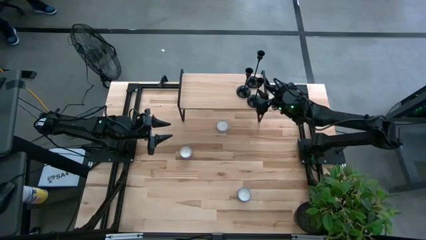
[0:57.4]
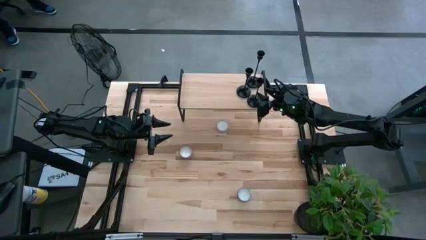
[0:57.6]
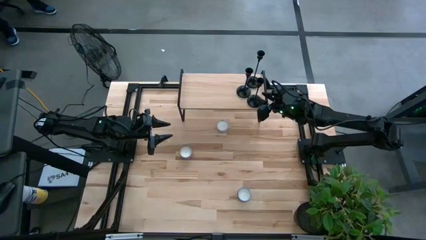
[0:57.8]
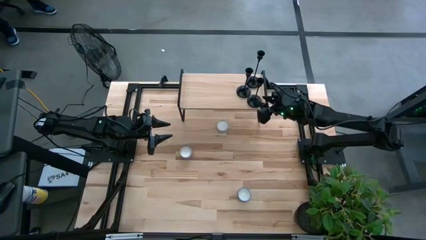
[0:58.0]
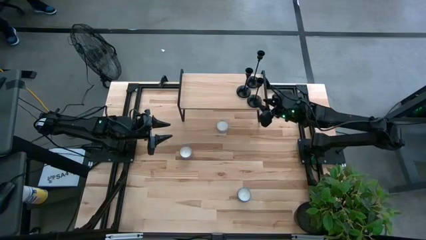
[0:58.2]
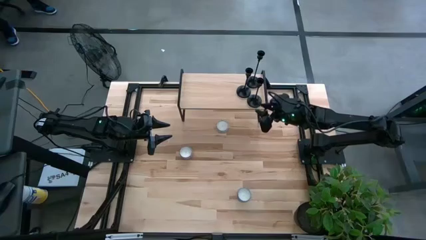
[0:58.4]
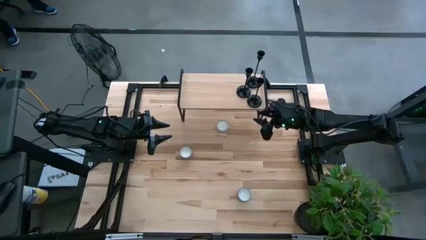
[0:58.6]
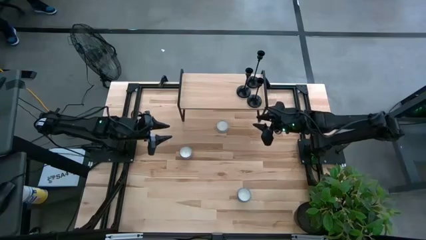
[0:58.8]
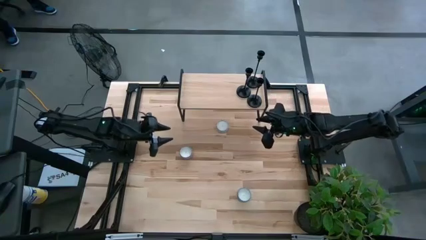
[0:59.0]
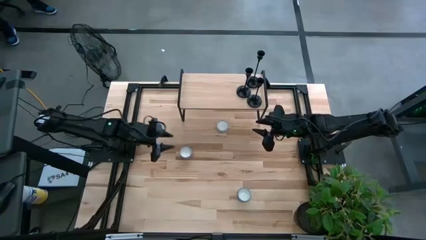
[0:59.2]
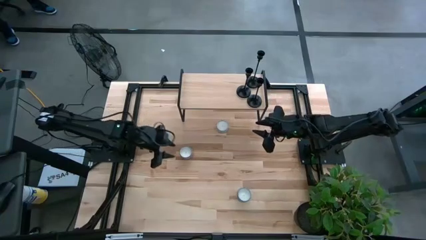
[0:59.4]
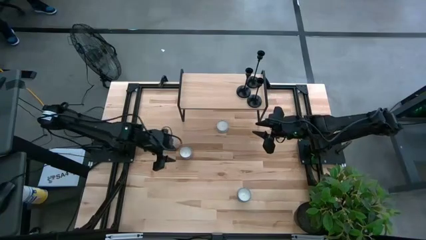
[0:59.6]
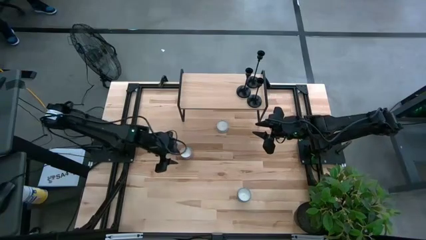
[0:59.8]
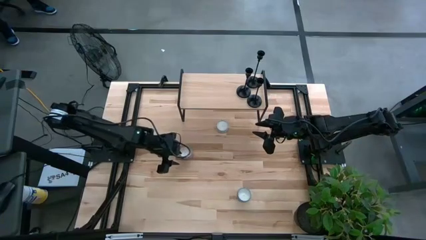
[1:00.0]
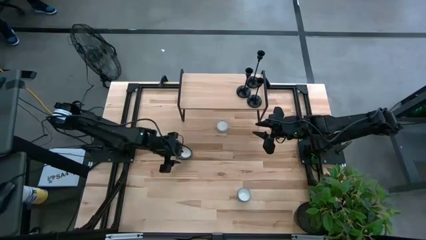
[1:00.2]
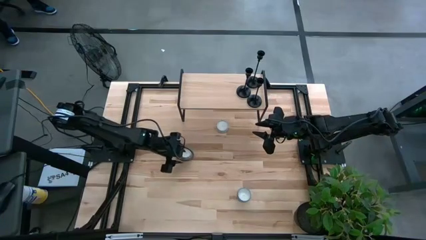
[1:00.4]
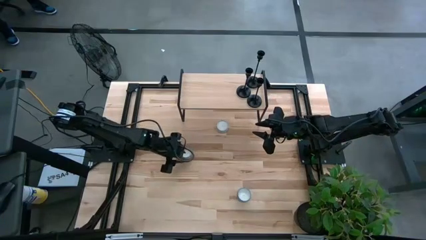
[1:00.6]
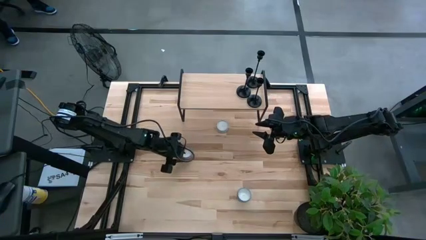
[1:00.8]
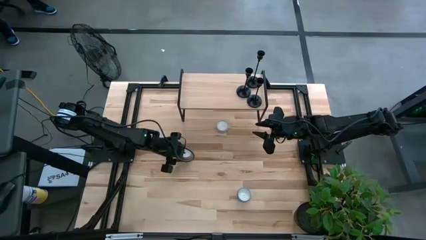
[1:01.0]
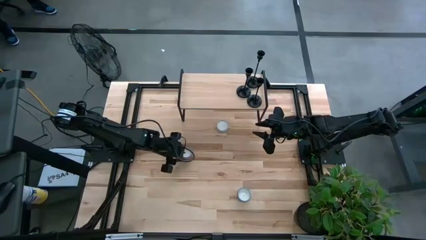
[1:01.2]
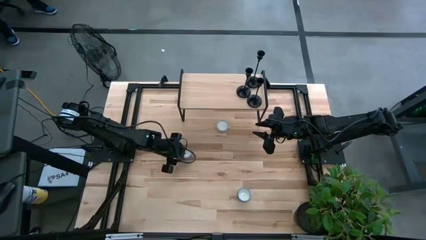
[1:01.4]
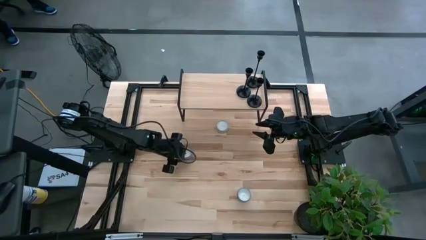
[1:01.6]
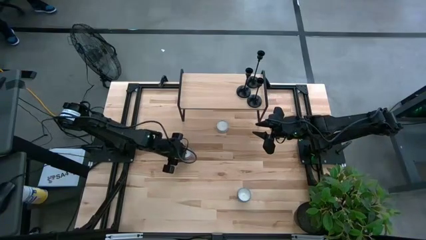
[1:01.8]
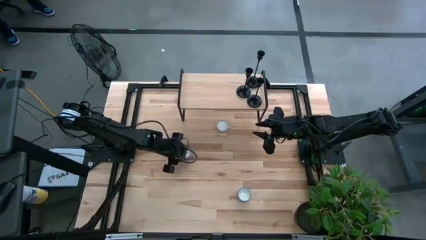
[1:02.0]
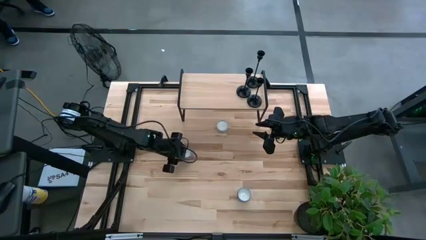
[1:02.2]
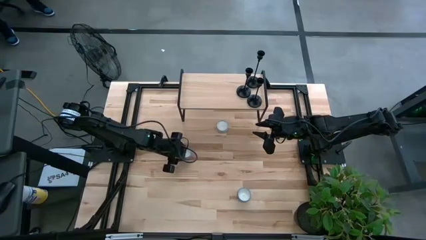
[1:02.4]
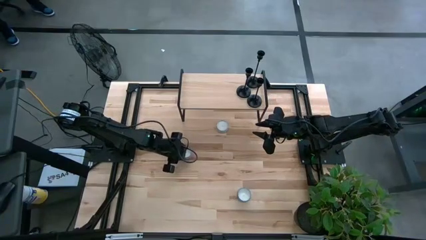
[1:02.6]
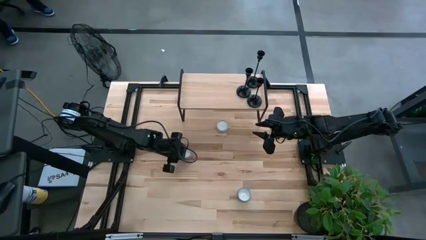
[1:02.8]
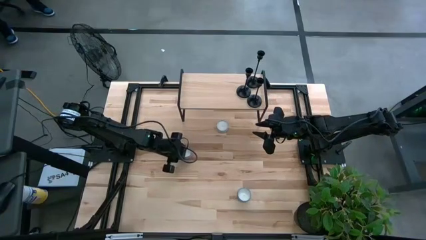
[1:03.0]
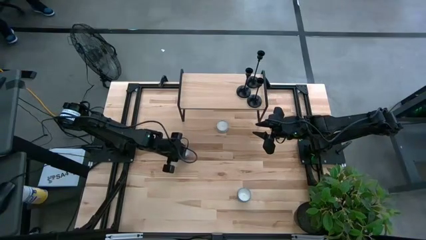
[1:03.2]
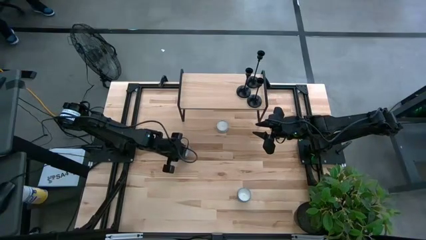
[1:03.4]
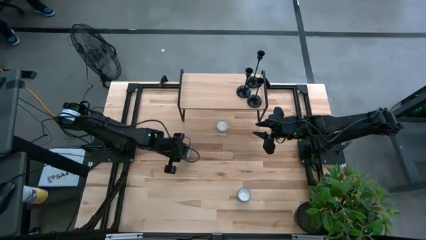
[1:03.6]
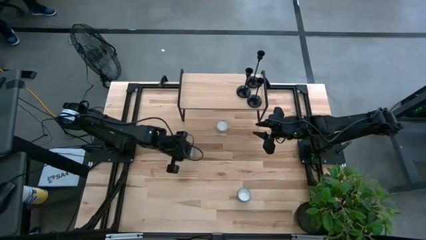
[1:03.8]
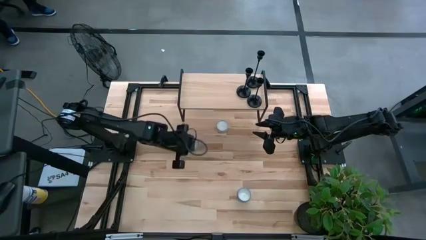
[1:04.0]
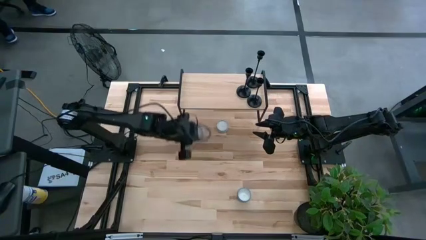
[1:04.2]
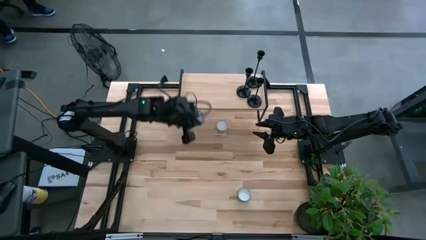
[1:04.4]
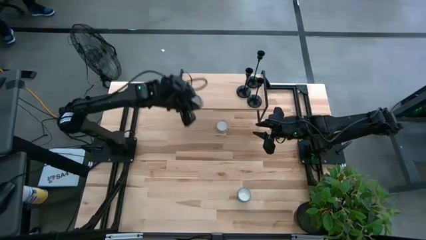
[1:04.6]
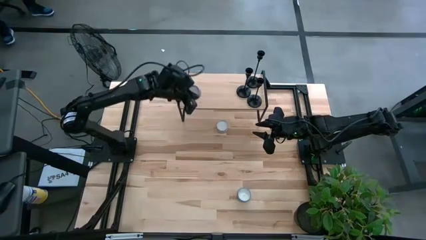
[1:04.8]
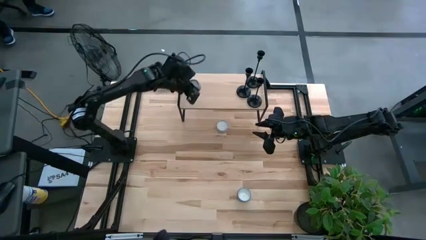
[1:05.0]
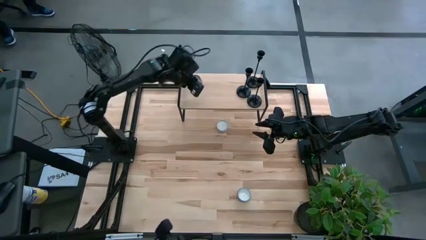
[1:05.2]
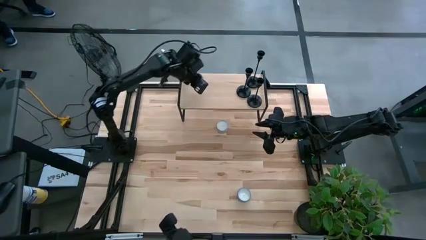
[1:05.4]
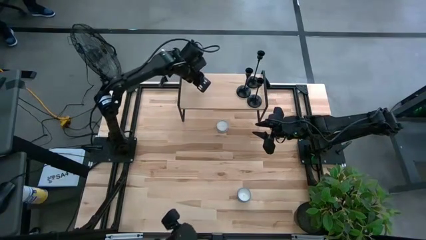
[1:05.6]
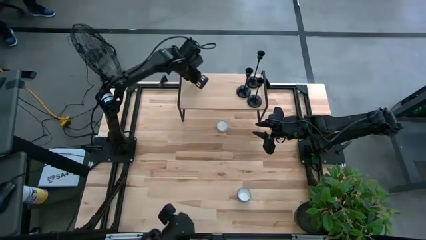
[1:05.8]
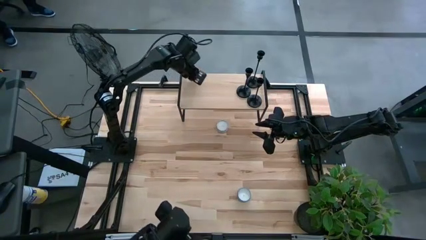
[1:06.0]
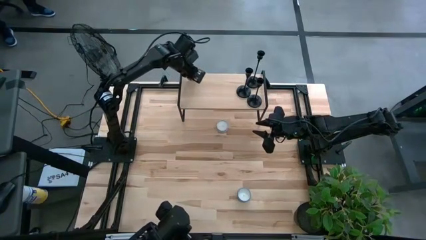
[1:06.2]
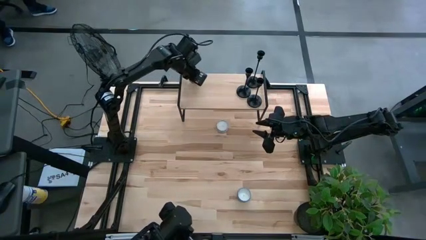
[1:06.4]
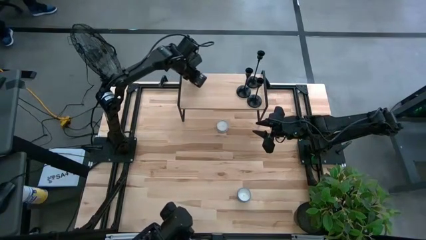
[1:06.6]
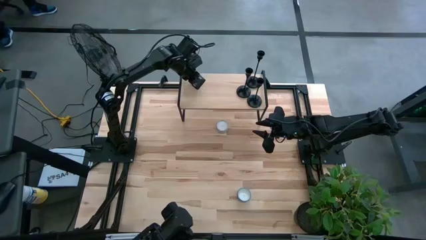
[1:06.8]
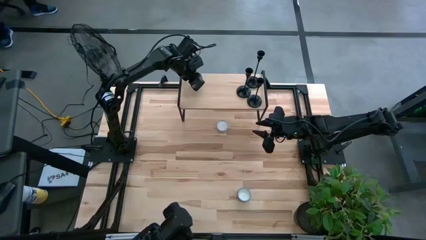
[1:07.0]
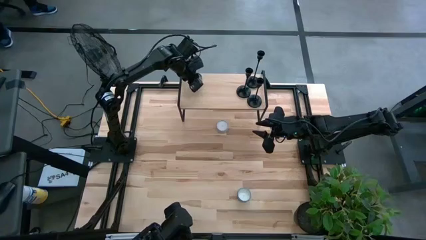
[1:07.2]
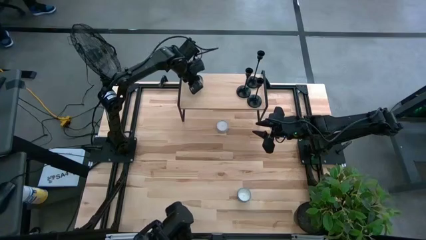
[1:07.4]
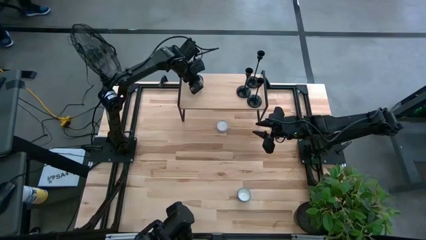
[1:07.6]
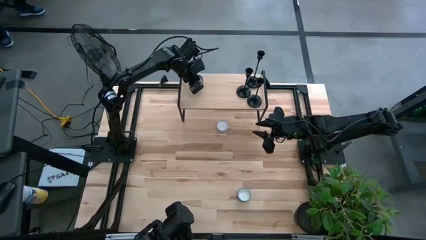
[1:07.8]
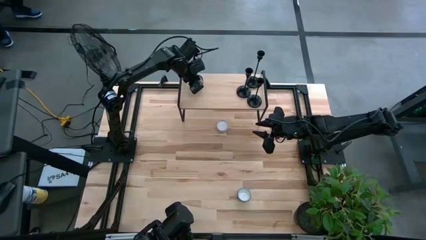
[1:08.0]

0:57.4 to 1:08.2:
Task: Pick & Place candle stick holders
Put the pink scented candle on the shelf

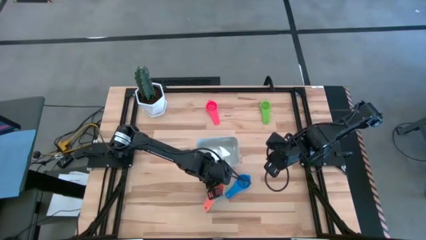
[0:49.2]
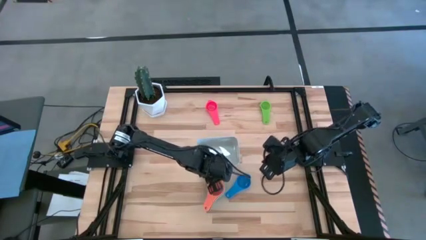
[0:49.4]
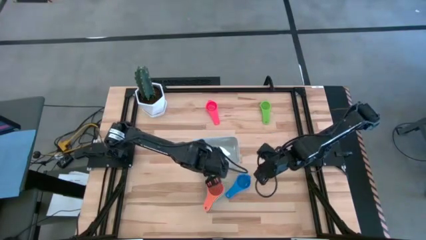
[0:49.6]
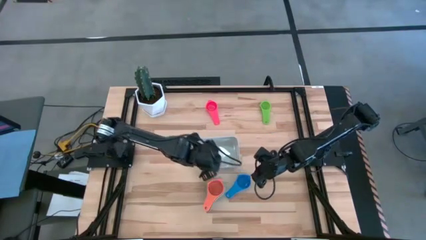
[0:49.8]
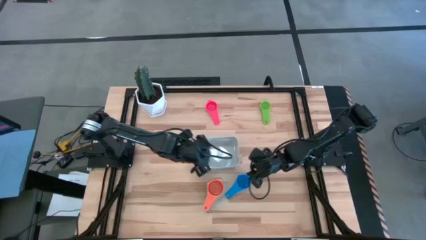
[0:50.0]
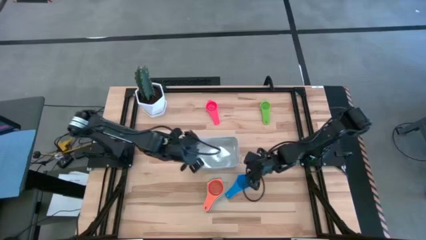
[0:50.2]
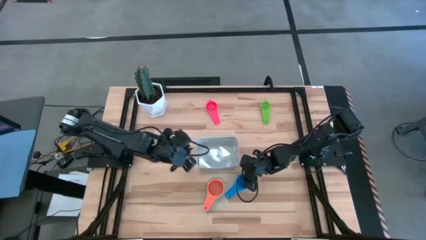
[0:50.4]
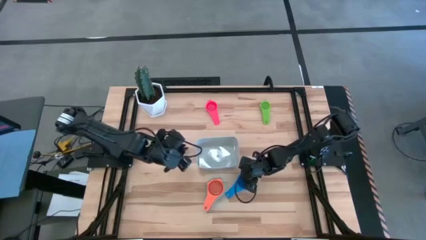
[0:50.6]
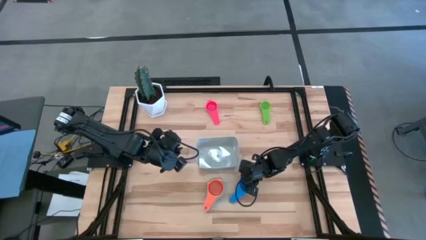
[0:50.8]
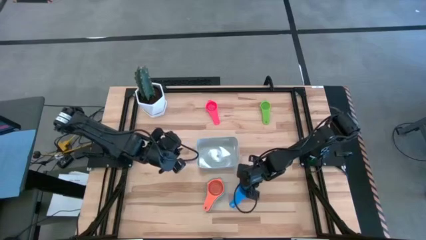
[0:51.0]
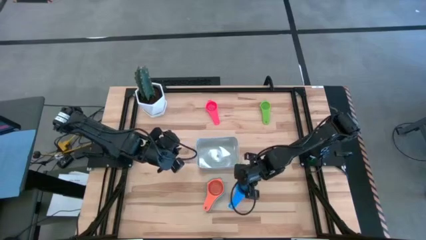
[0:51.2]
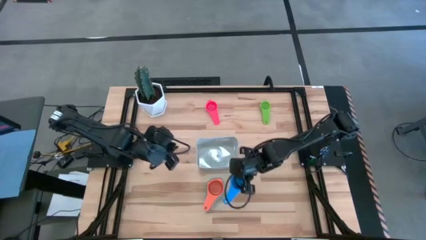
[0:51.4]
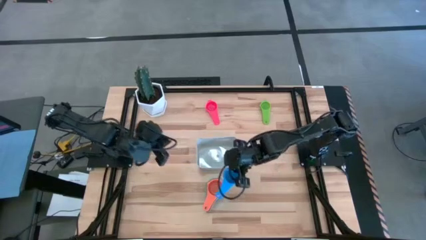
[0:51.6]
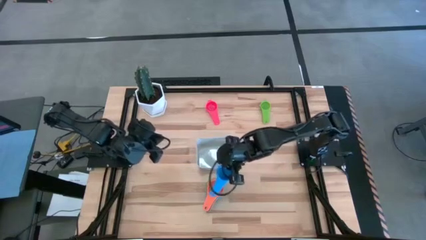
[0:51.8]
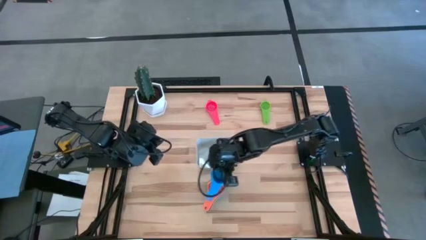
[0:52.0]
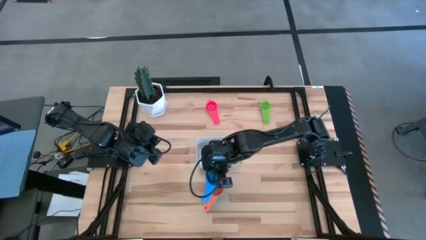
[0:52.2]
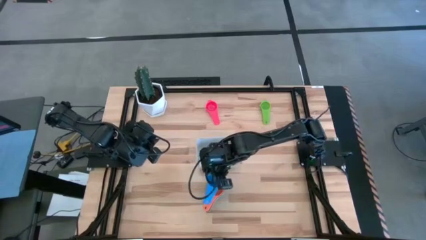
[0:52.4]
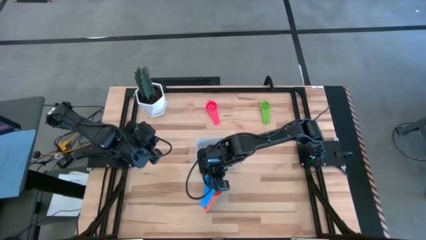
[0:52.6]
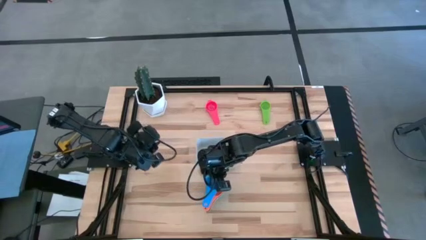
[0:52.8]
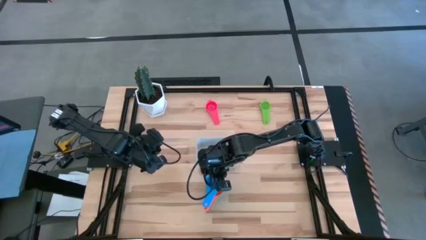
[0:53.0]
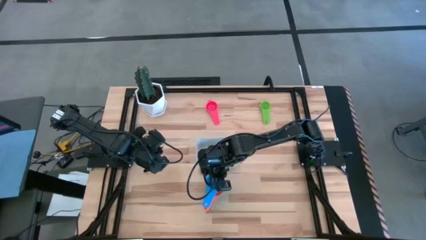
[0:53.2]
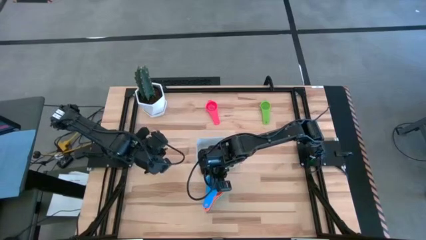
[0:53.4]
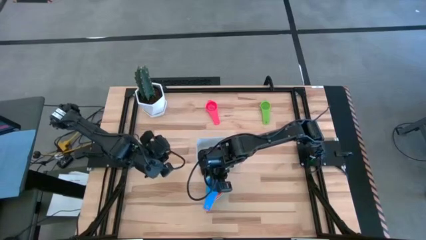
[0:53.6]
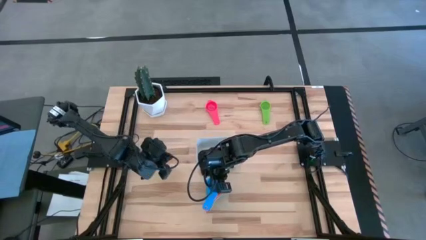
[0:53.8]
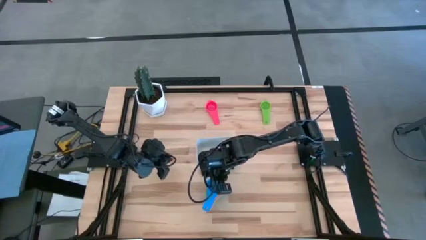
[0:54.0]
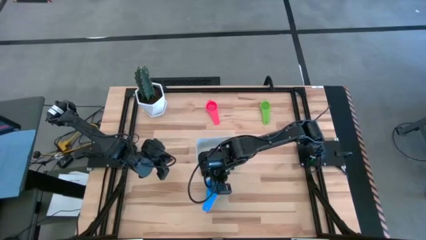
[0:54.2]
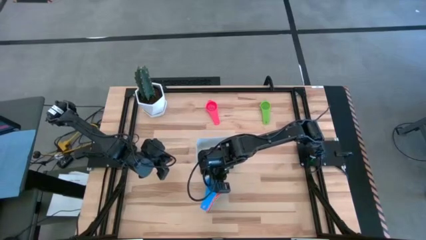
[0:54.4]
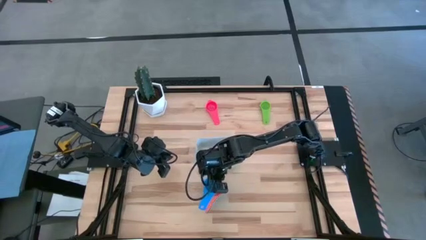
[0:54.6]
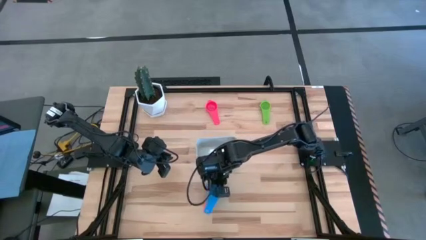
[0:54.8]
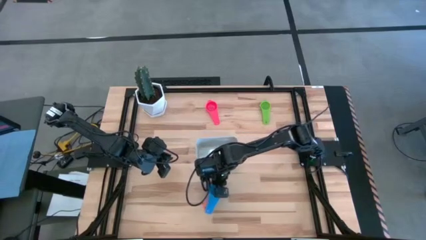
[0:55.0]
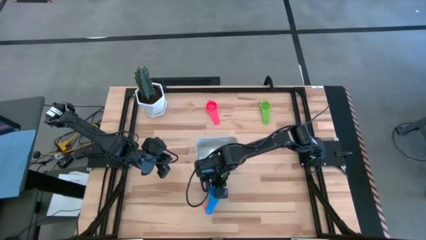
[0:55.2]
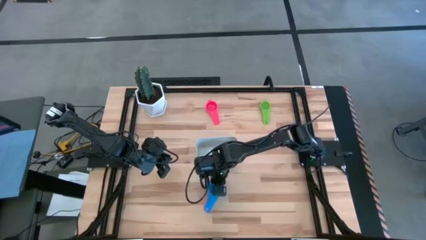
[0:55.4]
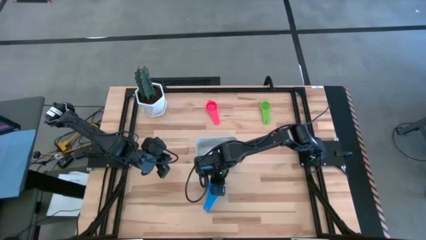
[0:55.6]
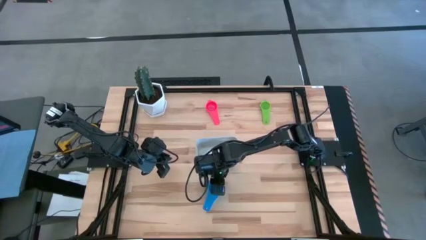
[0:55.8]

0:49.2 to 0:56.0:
Task: Nest measuring cups in basket
Stack the blue measuring cup on top of the orange measuring cup
